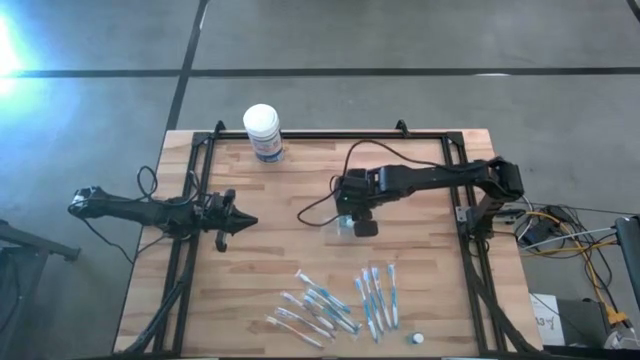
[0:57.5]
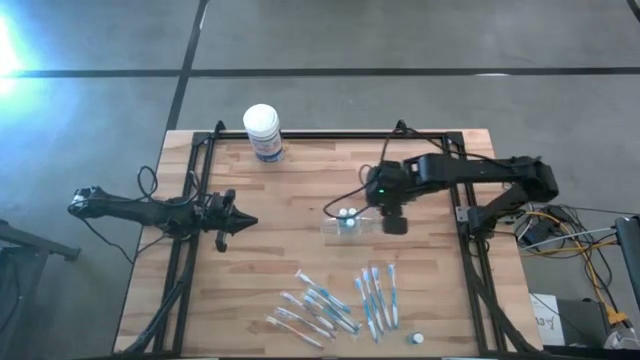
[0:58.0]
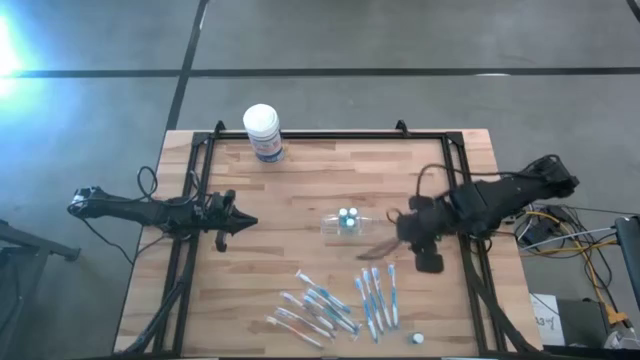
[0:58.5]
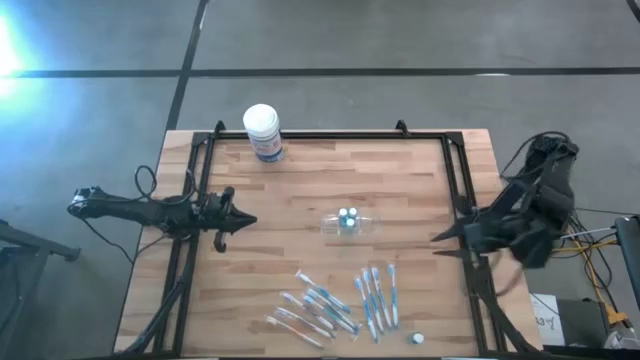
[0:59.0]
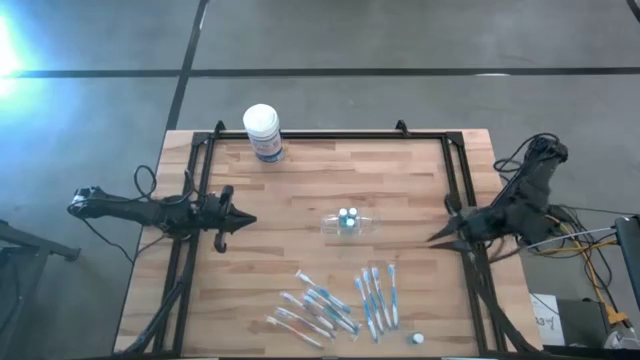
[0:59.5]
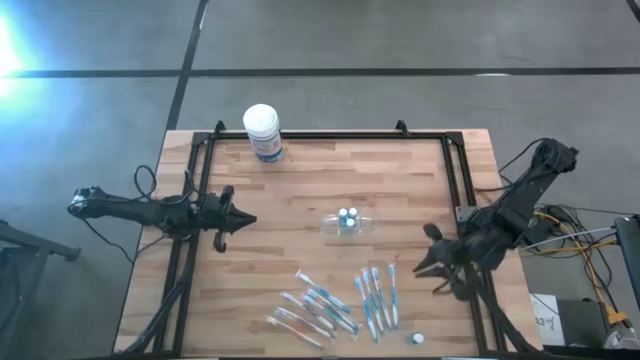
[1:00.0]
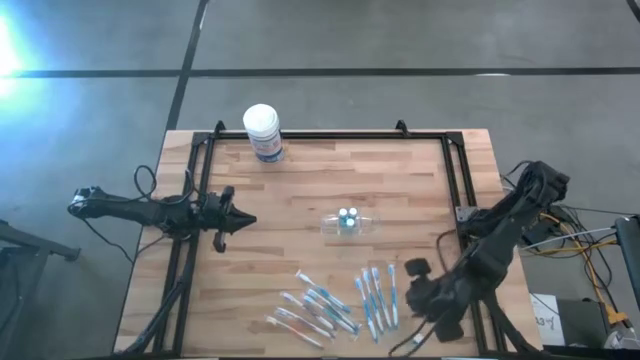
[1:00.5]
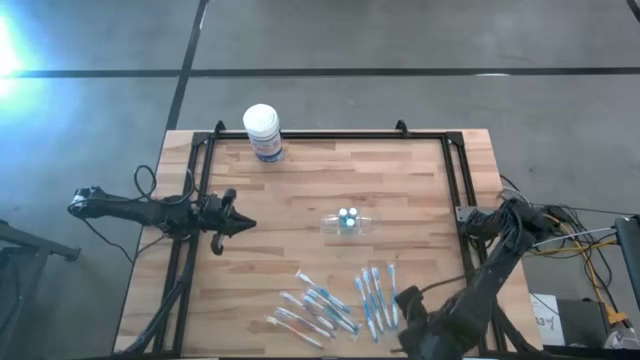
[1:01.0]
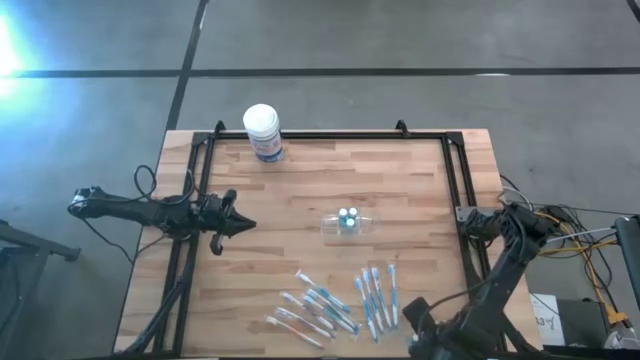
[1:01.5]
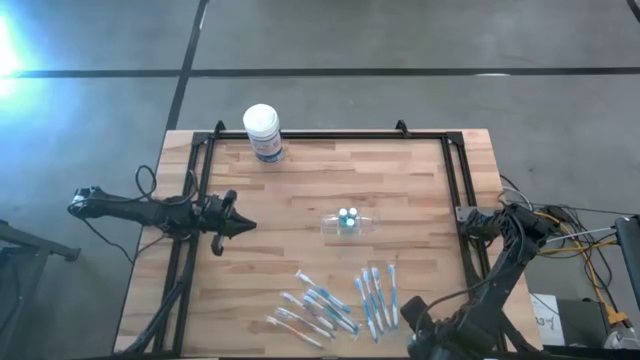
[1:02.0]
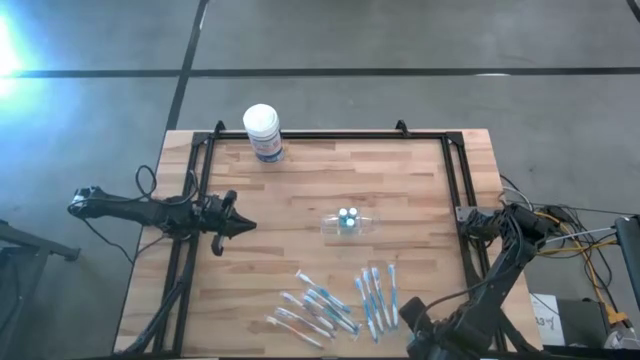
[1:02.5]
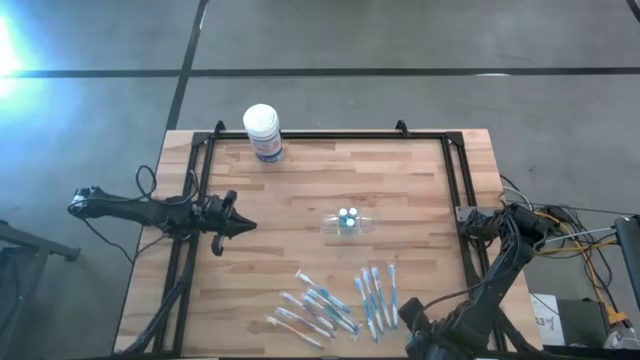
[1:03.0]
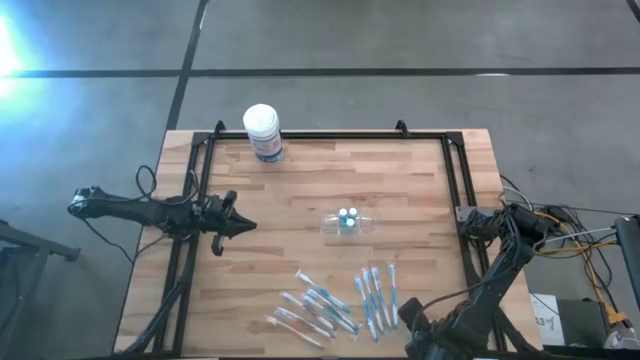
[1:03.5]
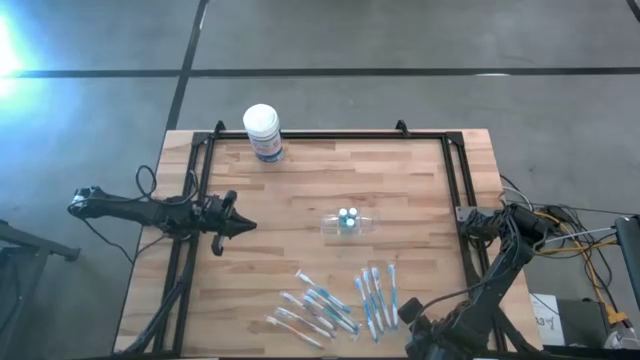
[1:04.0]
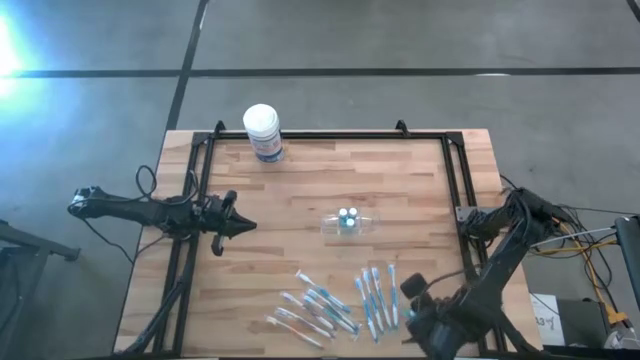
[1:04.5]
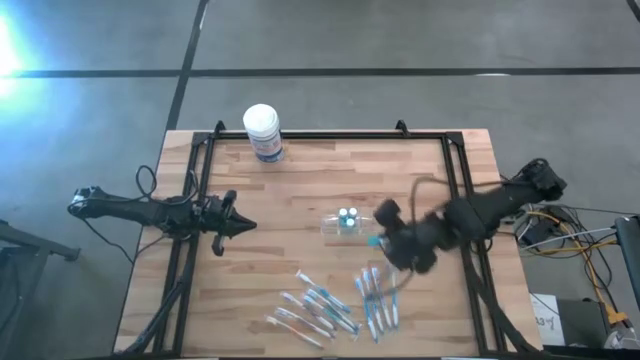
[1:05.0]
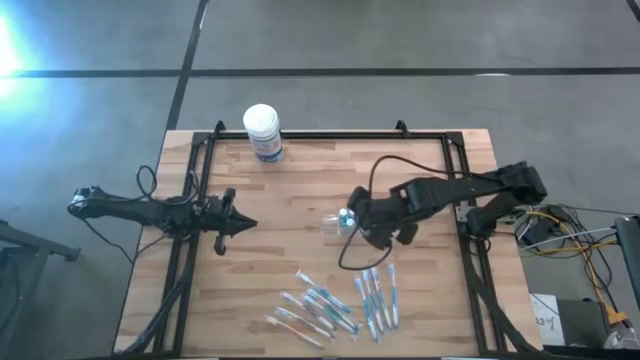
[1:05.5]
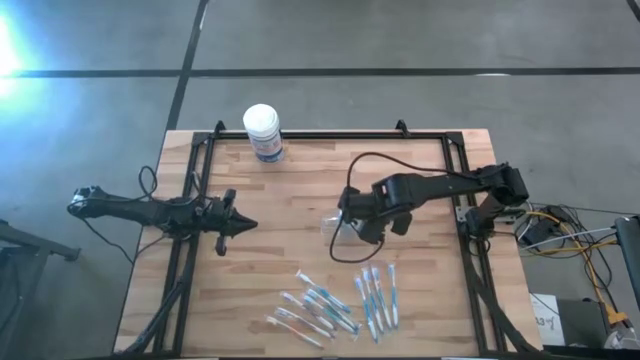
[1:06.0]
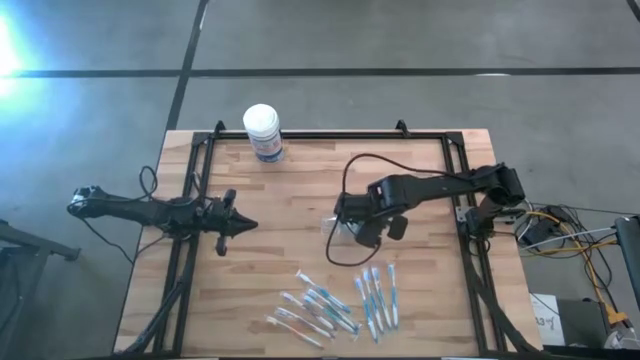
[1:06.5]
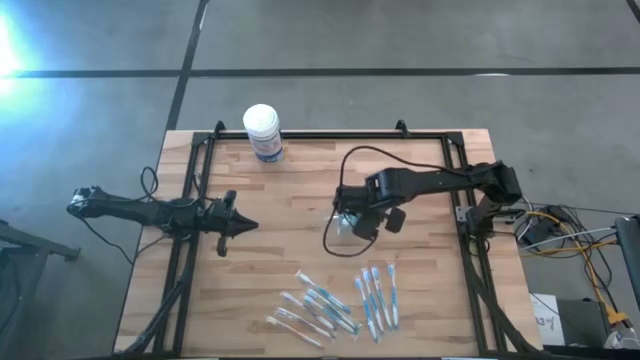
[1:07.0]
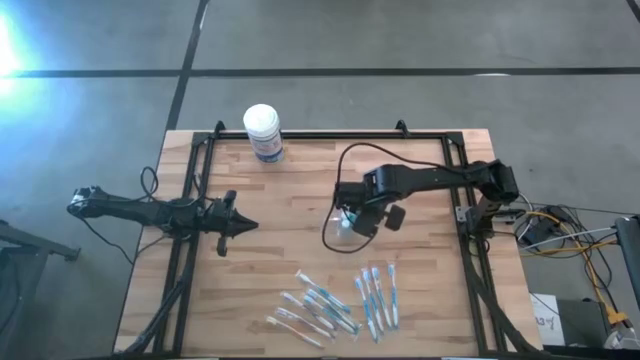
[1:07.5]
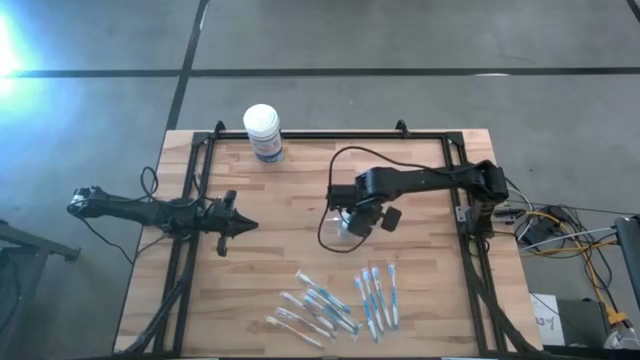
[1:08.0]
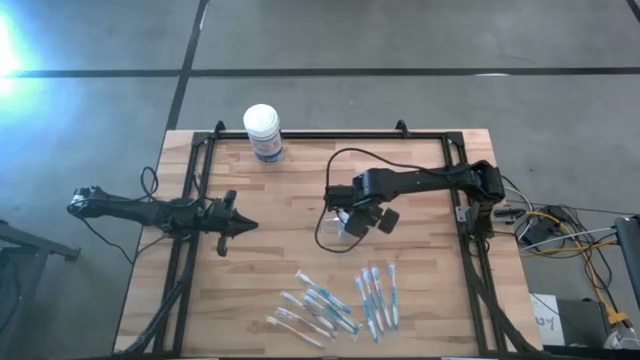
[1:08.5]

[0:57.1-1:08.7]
Task: Pick & Place toothbrushing station
Put the blue mouthwash into the transparent organizer

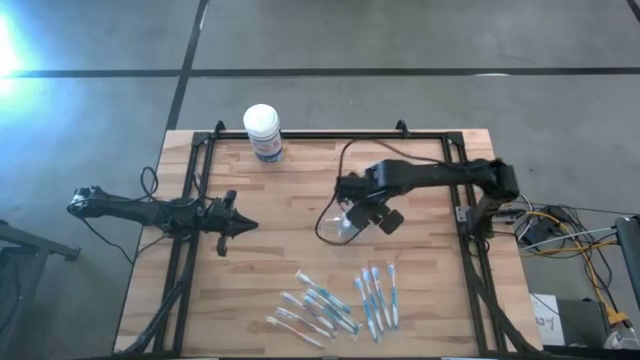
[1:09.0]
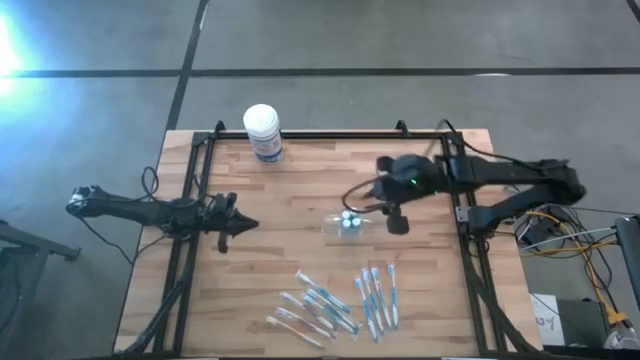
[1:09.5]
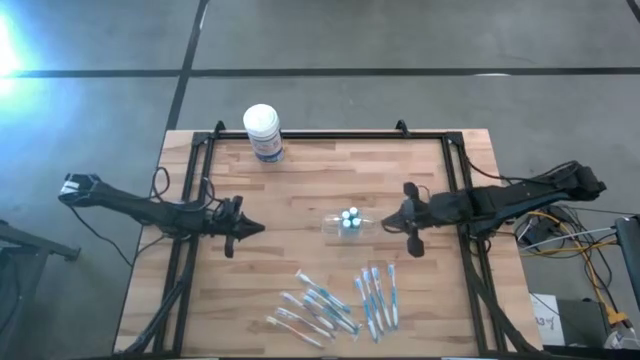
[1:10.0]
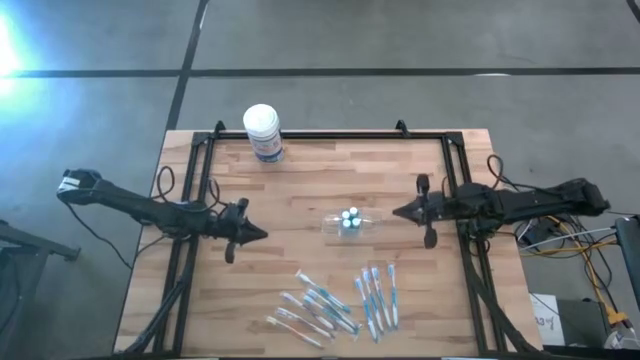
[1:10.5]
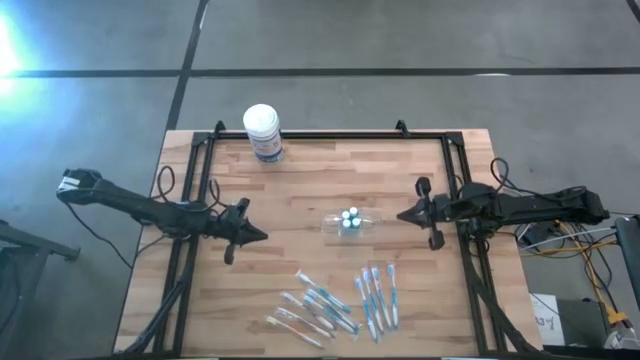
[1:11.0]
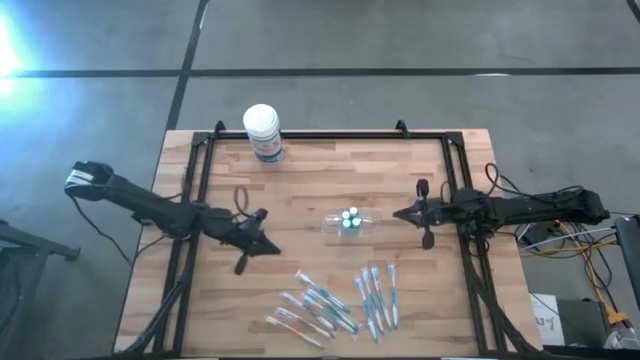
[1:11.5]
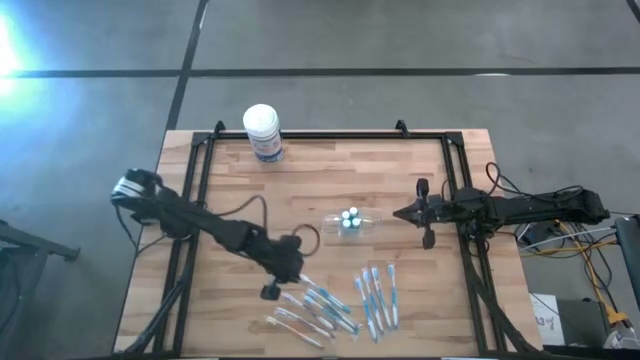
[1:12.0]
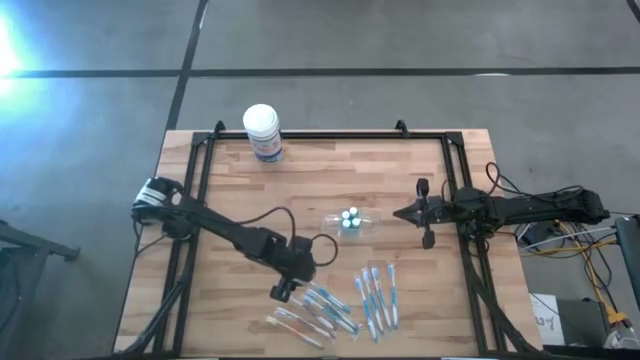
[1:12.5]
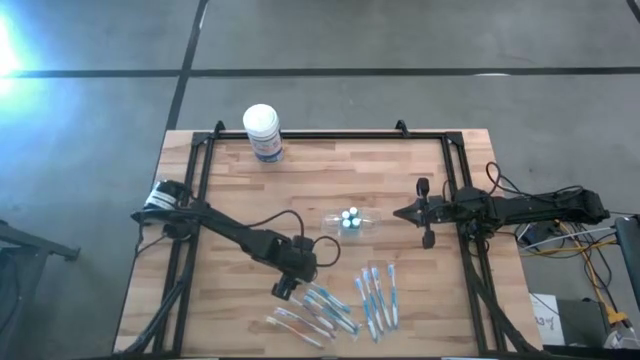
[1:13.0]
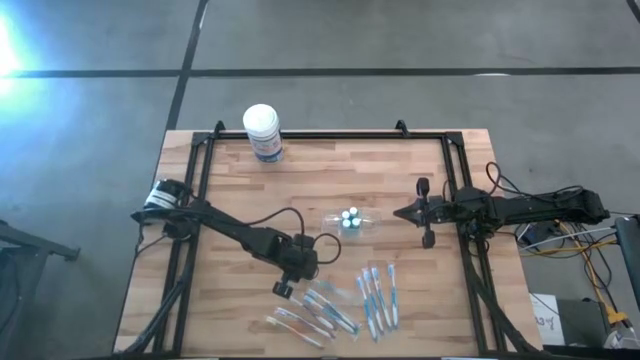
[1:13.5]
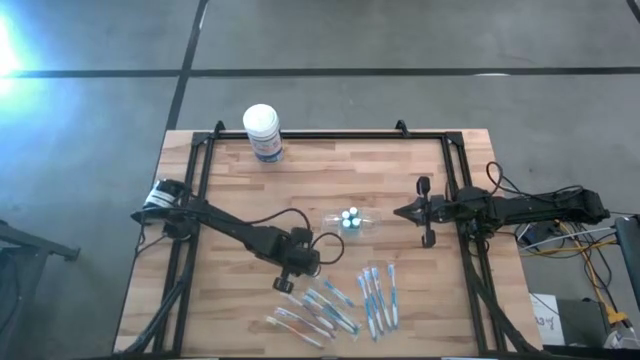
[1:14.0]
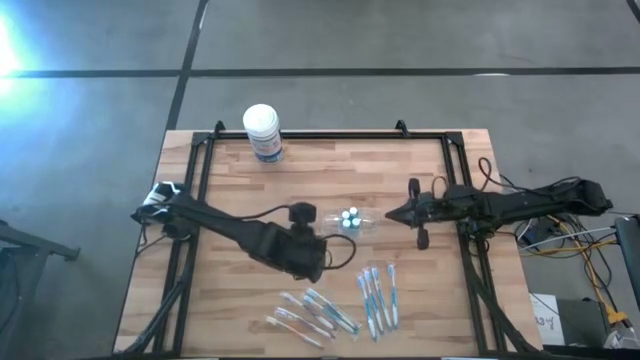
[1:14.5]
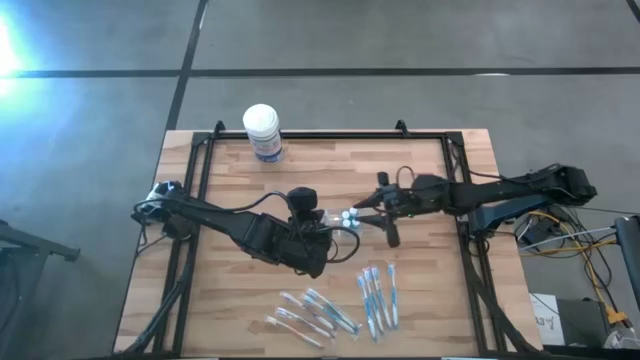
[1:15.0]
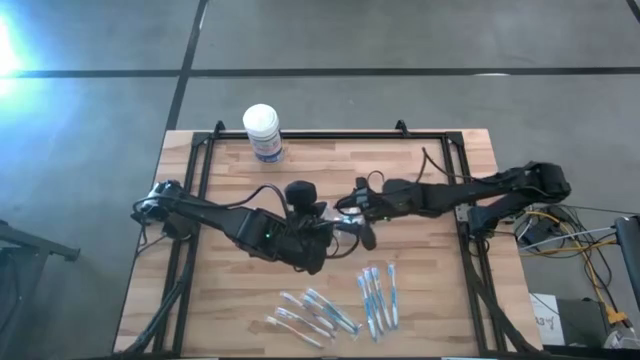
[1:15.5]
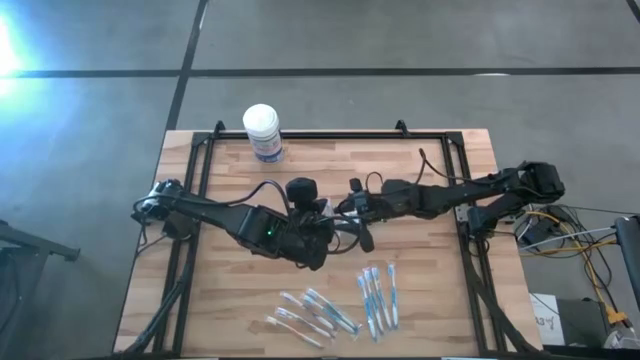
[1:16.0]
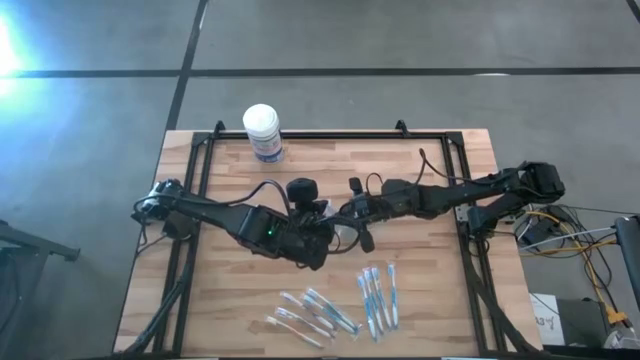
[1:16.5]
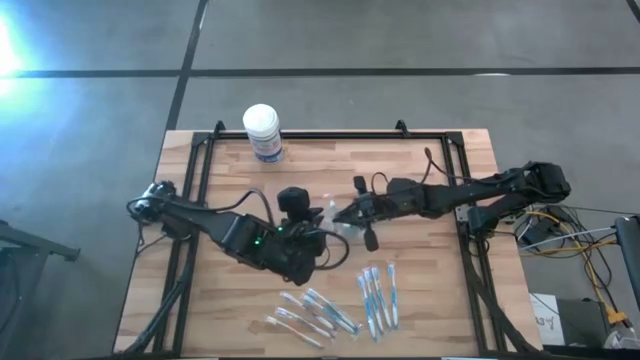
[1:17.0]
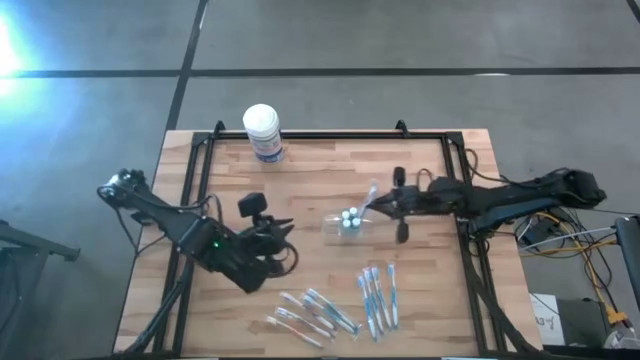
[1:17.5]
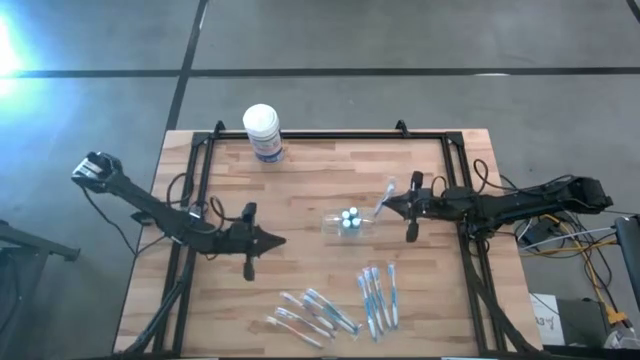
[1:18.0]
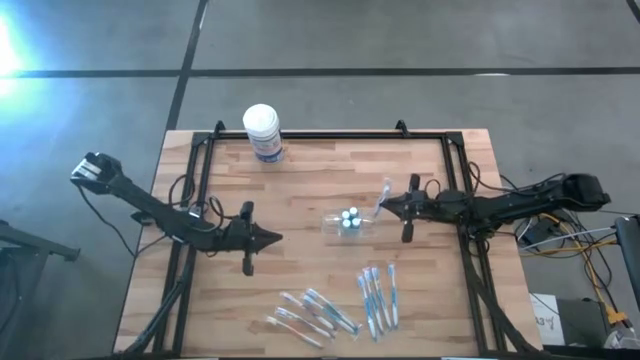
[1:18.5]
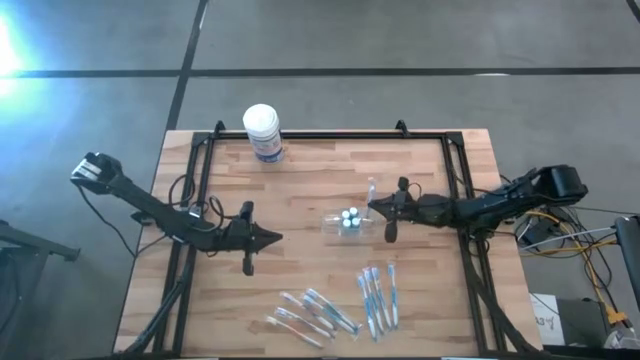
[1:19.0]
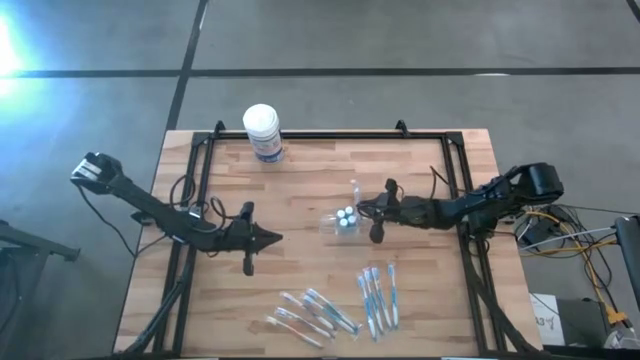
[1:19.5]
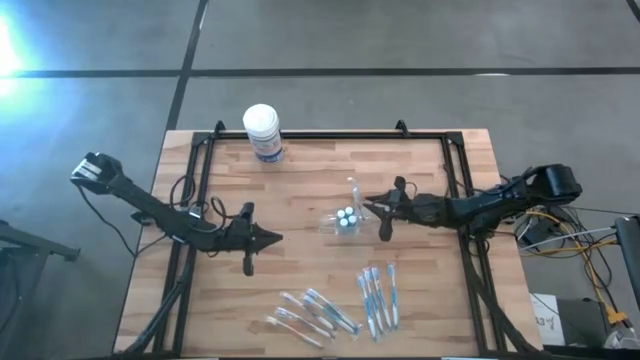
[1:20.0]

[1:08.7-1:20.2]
Put the blue toothbrush into the transparent organizer
